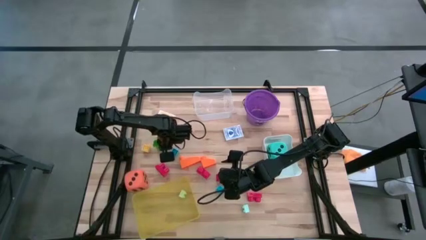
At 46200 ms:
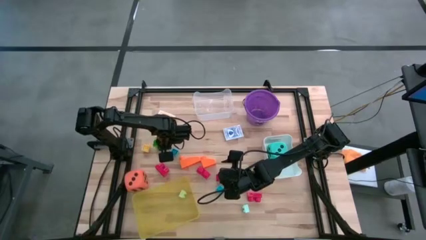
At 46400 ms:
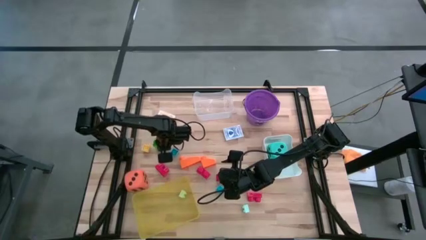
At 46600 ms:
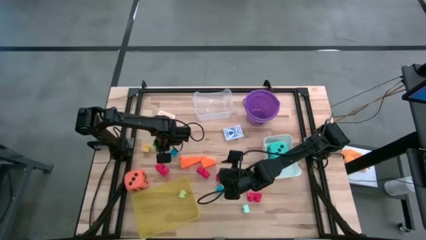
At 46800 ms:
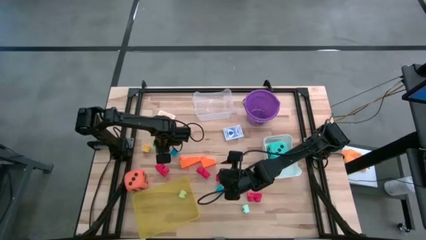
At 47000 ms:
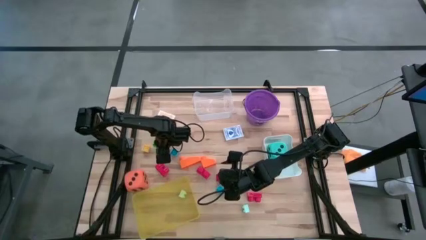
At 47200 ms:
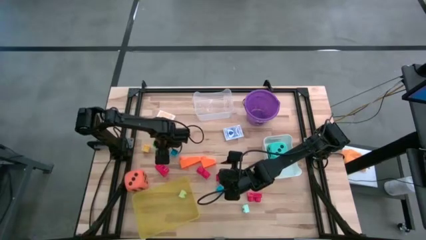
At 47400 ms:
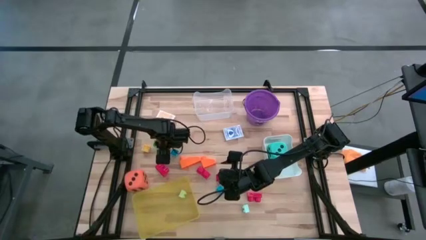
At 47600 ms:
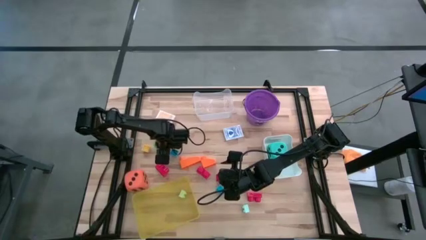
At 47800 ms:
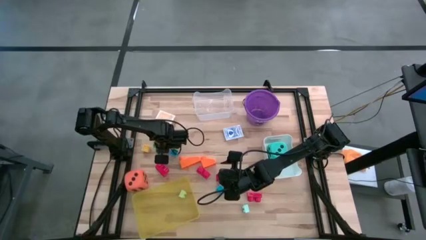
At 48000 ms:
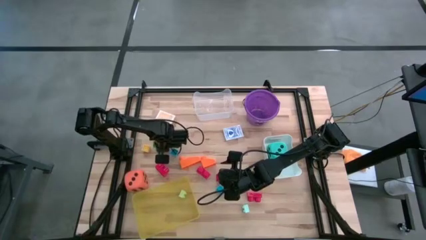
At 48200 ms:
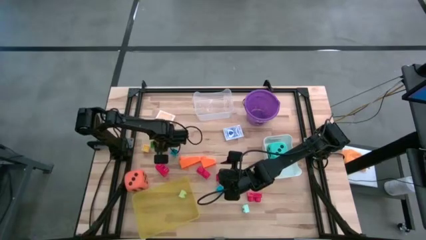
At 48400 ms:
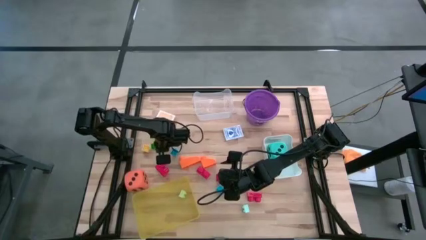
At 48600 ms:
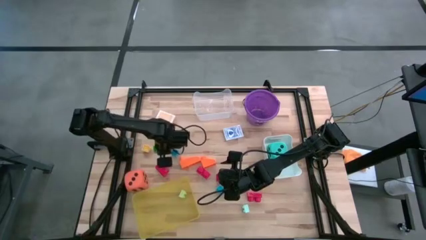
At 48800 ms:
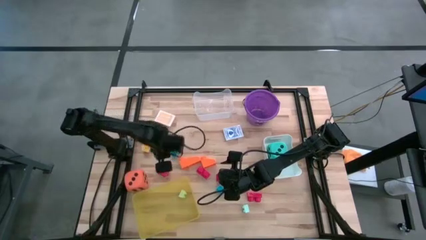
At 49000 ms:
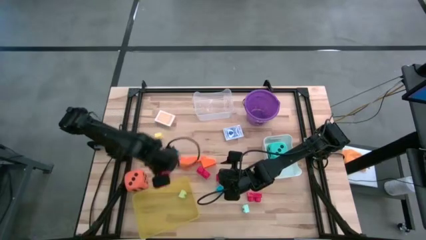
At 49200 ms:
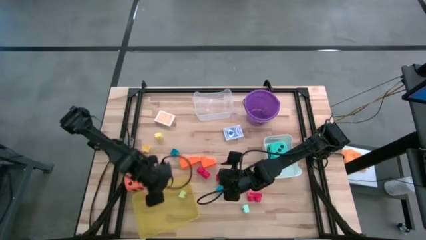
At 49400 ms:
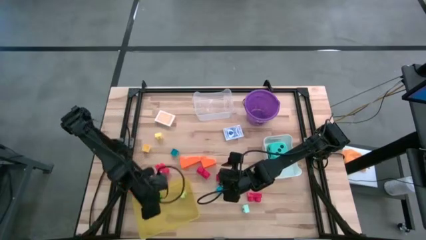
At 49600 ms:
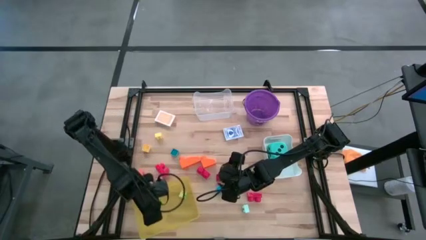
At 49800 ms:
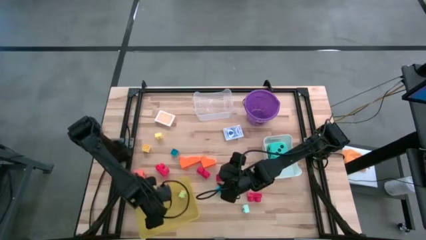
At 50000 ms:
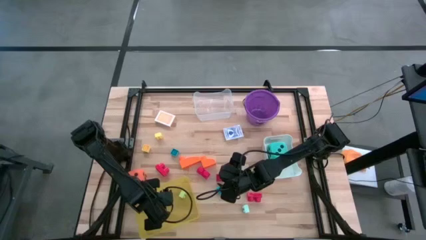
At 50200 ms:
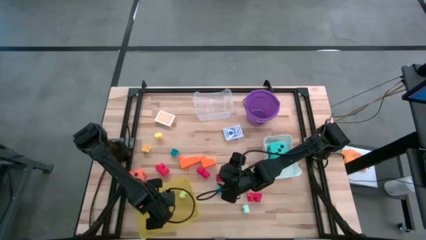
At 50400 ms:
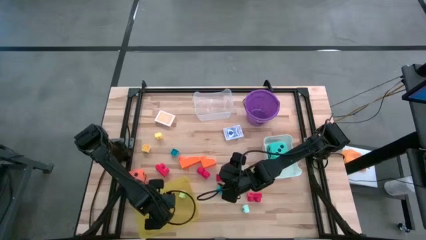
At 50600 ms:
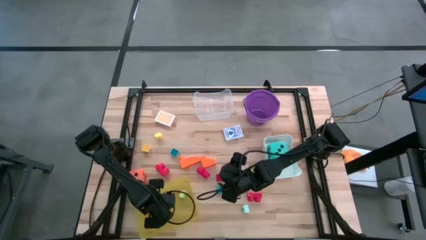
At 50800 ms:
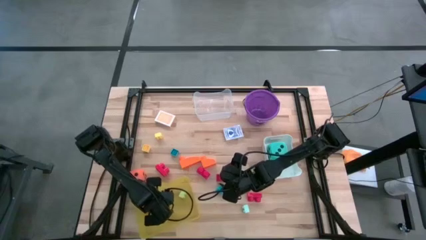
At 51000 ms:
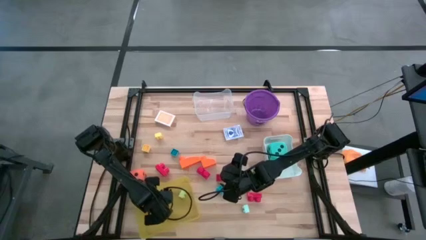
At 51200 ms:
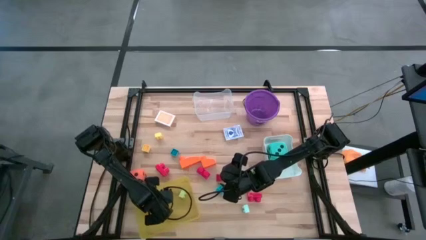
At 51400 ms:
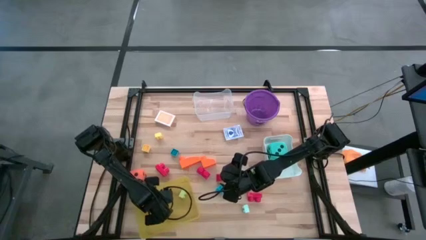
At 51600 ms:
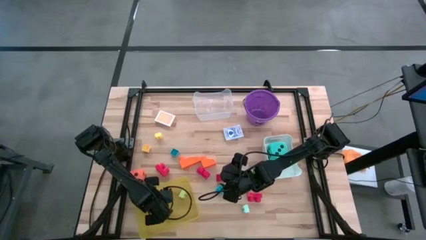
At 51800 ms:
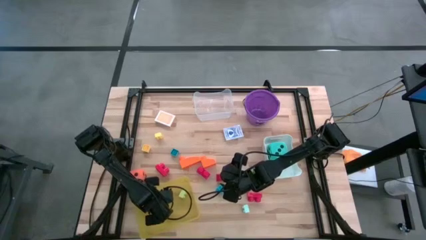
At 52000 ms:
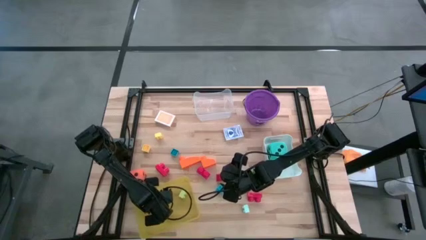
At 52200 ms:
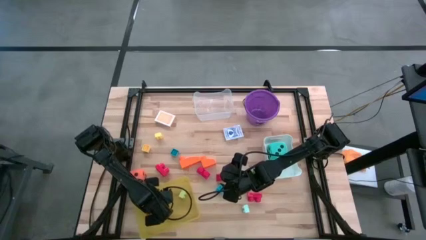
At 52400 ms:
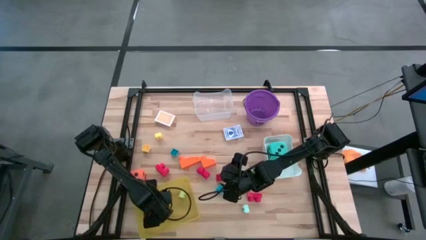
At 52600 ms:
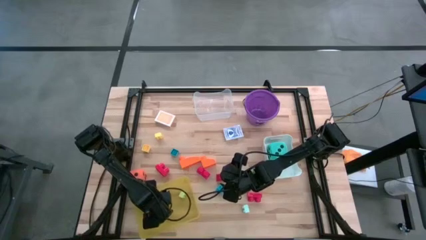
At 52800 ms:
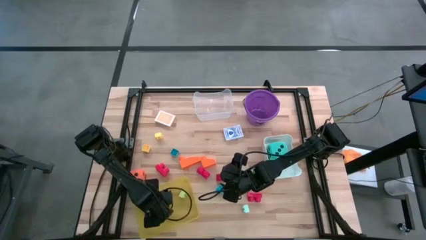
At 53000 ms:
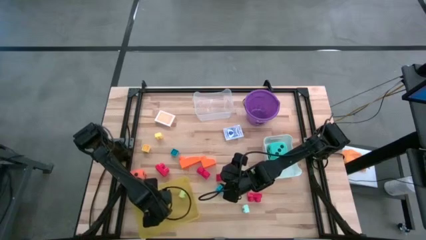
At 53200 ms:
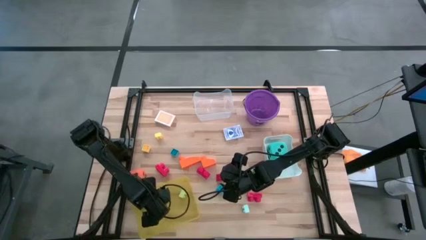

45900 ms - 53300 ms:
Task: Pick & Place Toys
Put the green game piece into the yellow bin

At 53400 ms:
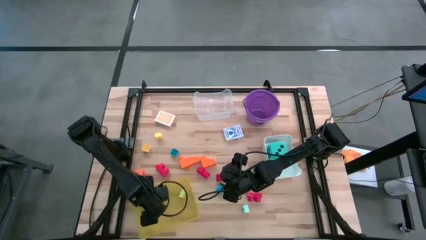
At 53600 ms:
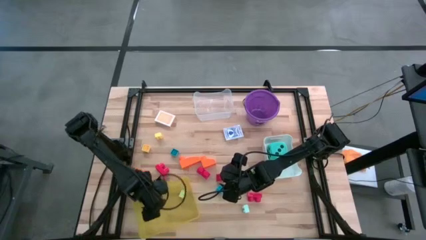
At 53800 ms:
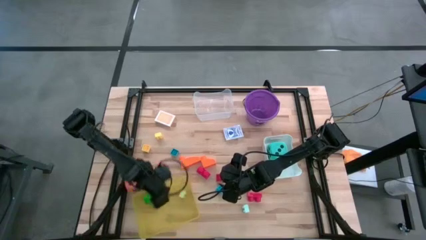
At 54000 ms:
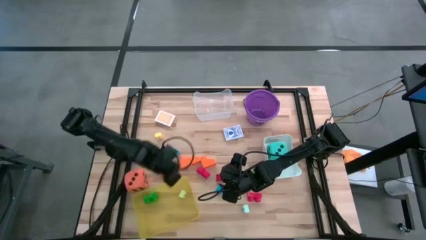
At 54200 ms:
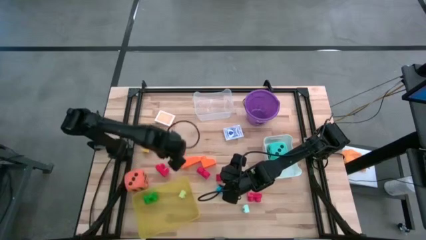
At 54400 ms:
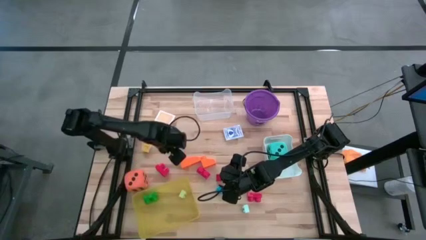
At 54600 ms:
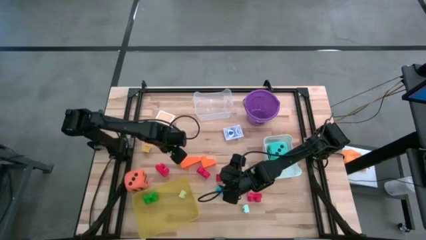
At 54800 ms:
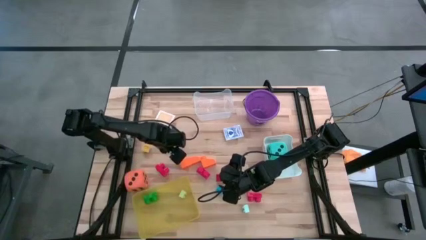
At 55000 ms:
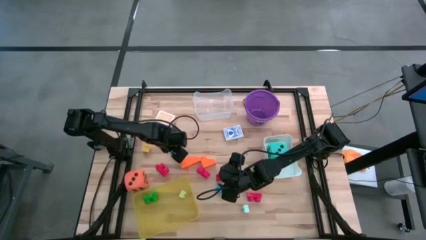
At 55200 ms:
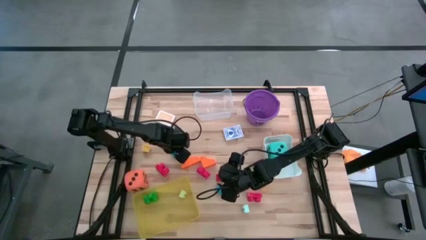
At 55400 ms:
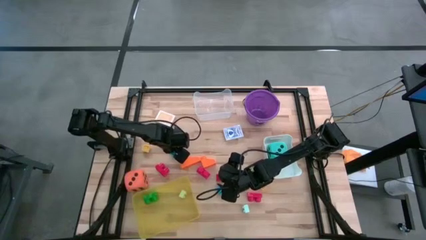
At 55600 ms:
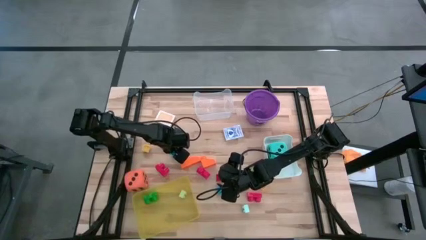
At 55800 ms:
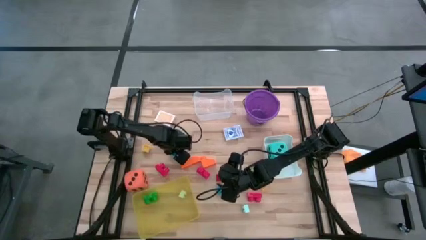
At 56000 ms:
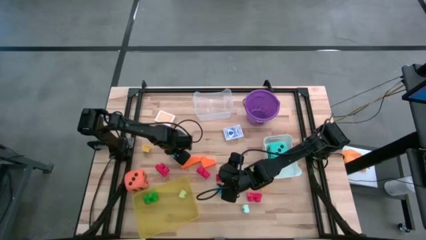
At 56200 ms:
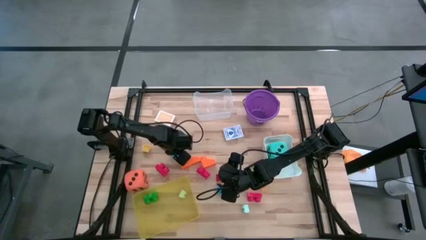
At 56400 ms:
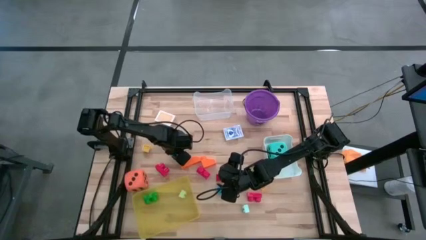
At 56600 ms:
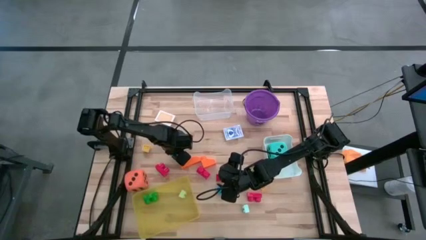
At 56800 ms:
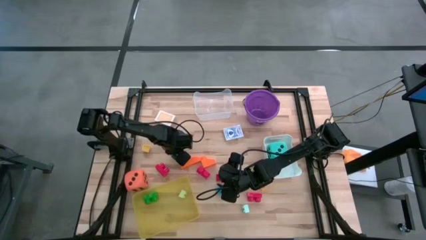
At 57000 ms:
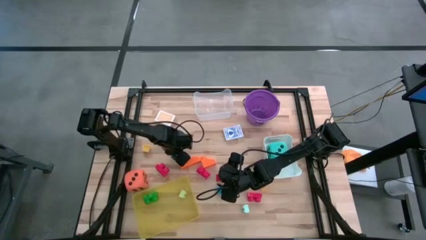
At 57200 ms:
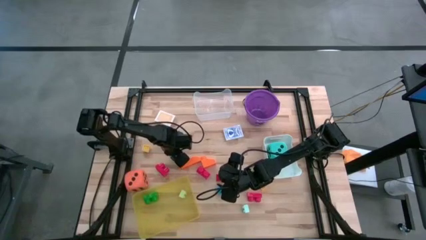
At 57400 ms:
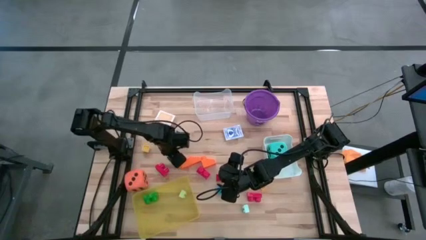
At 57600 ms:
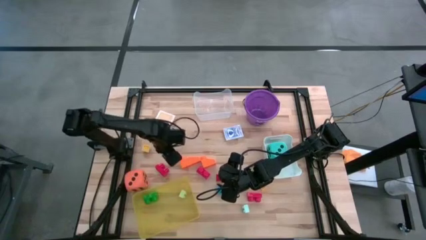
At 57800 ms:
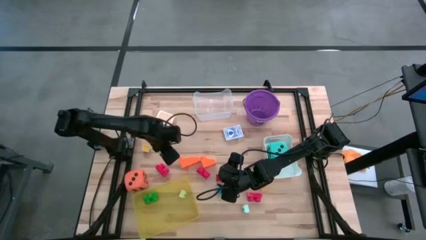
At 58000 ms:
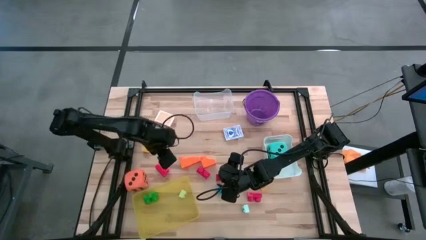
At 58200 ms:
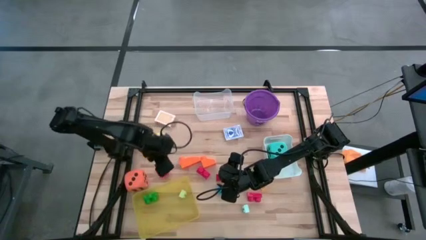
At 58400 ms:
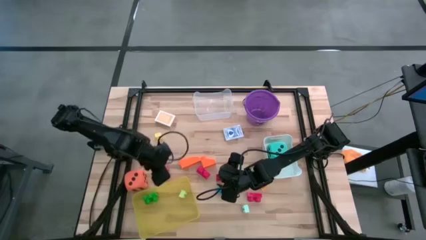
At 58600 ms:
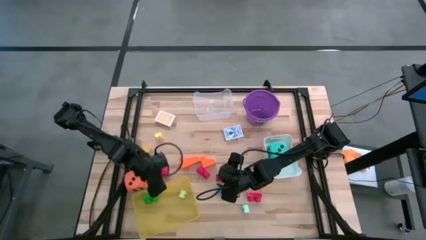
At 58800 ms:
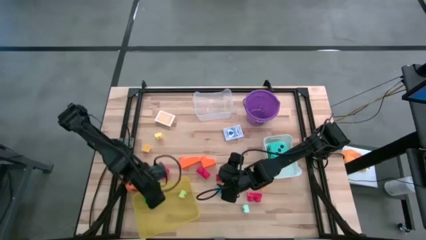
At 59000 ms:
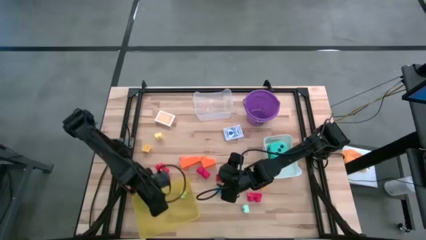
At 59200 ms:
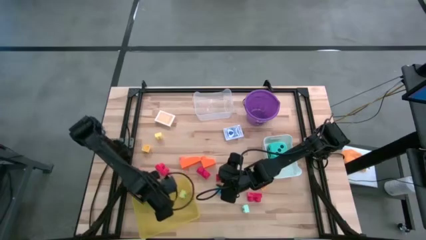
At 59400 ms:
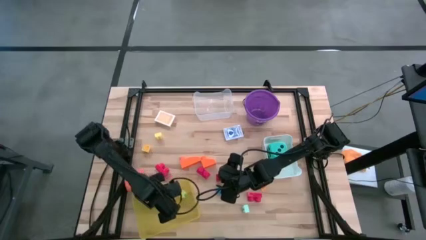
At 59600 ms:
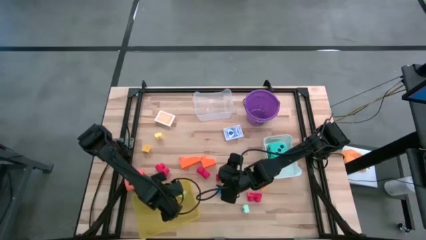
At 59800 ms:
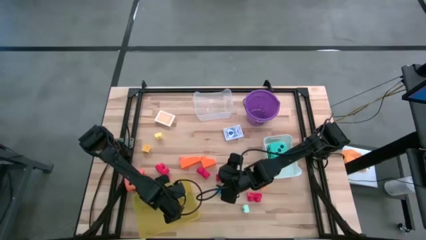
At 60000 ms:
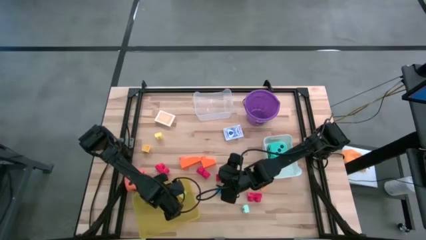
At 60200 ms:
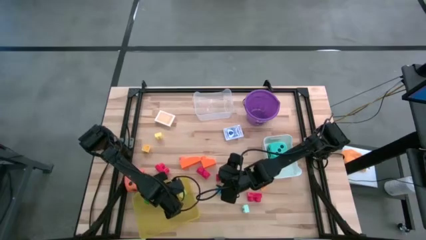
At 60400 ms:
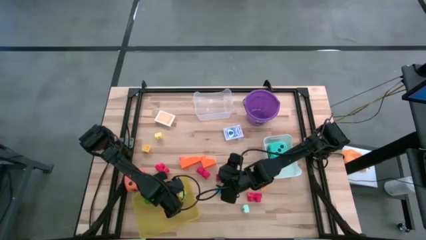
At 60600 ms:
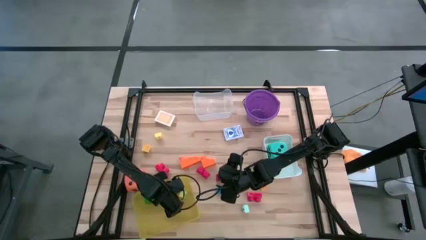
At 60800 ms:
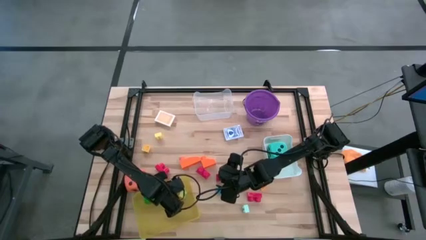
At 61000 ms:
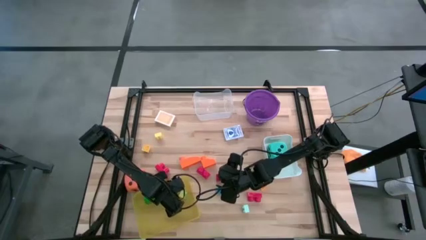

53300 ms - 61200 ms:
Put the blue game piece into the yellow bin
